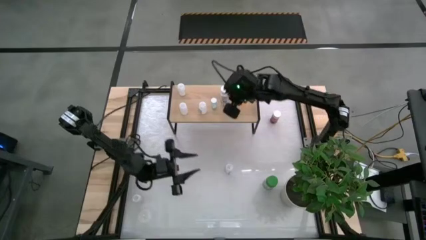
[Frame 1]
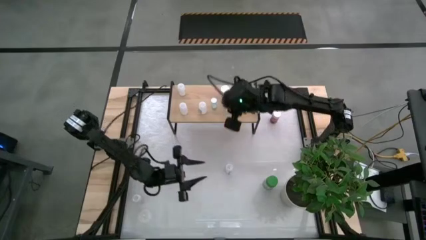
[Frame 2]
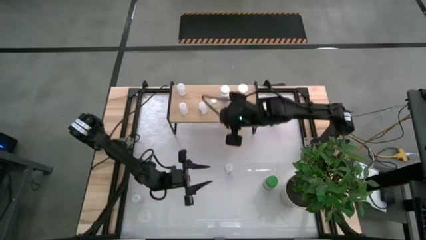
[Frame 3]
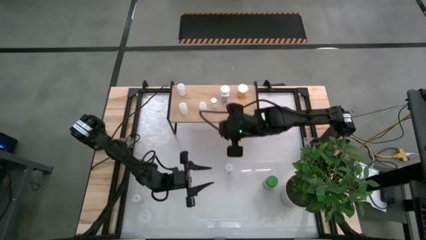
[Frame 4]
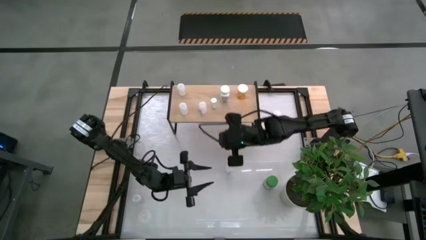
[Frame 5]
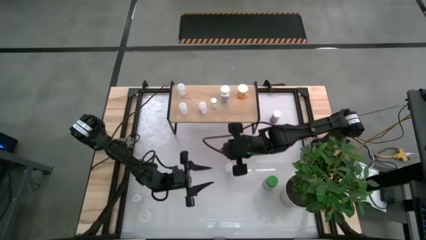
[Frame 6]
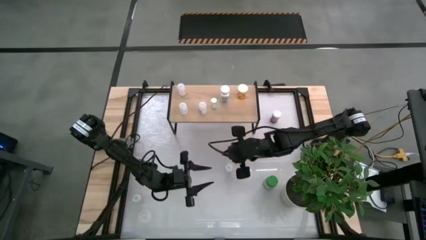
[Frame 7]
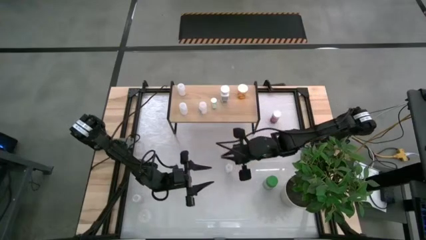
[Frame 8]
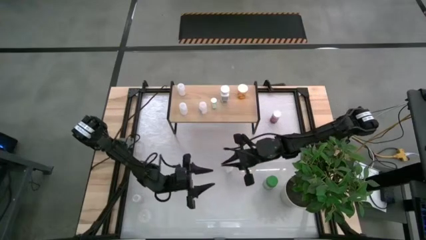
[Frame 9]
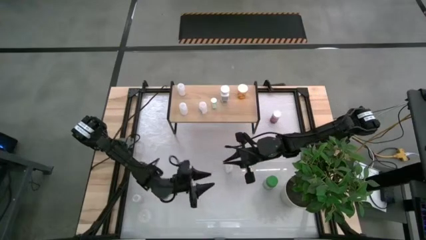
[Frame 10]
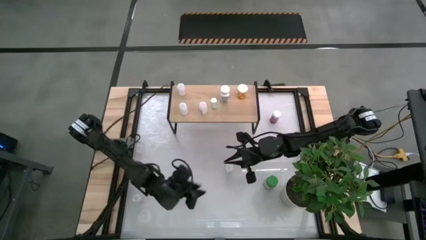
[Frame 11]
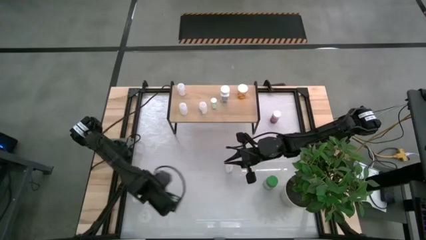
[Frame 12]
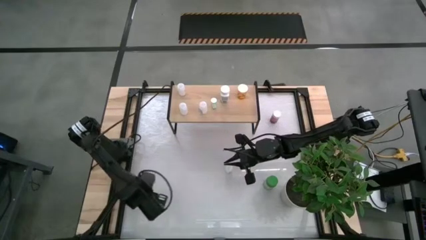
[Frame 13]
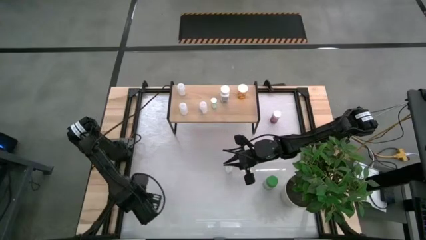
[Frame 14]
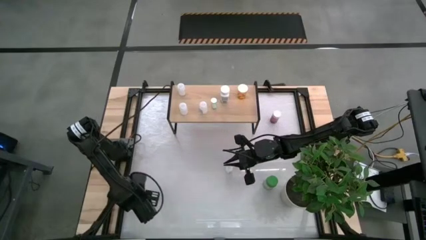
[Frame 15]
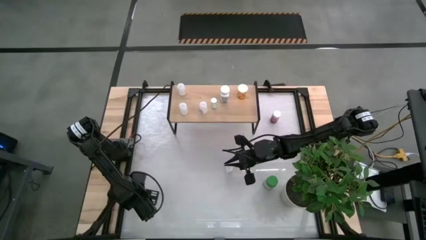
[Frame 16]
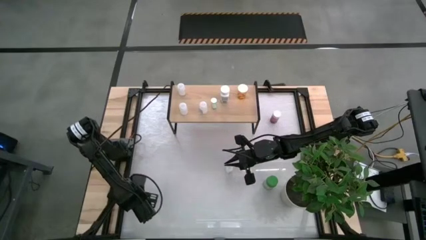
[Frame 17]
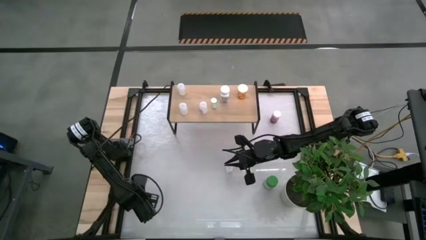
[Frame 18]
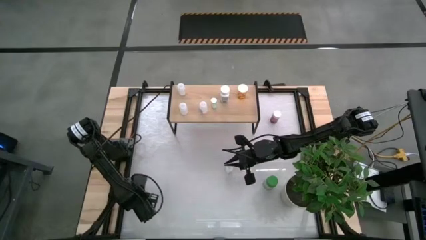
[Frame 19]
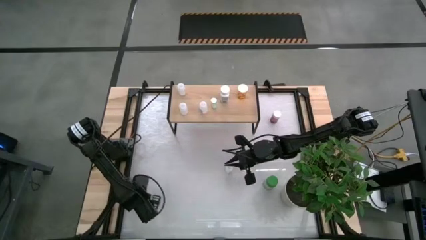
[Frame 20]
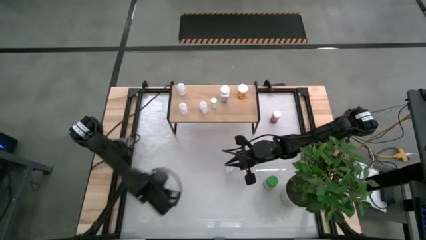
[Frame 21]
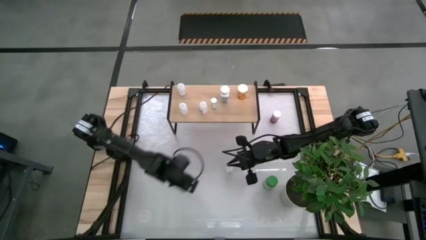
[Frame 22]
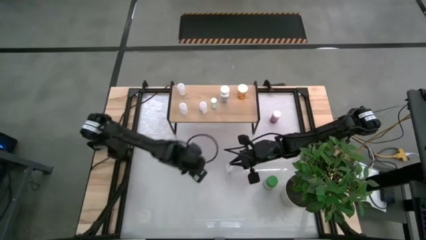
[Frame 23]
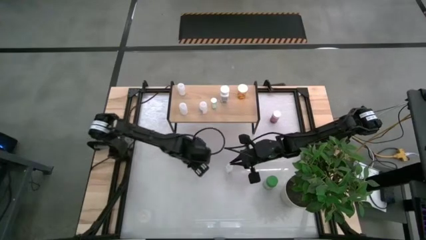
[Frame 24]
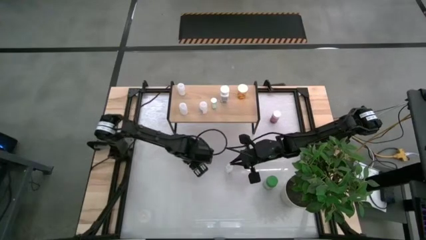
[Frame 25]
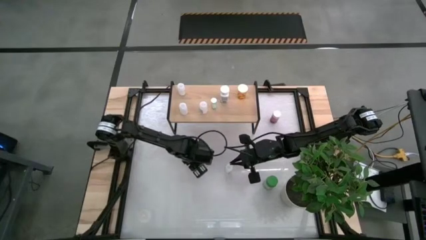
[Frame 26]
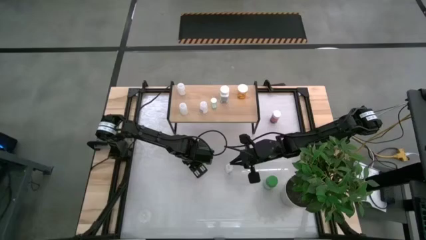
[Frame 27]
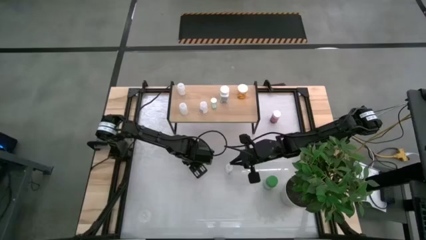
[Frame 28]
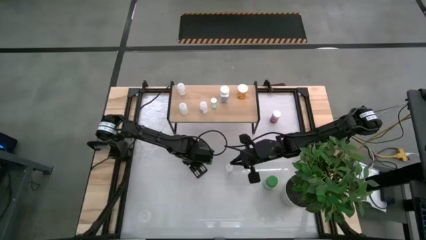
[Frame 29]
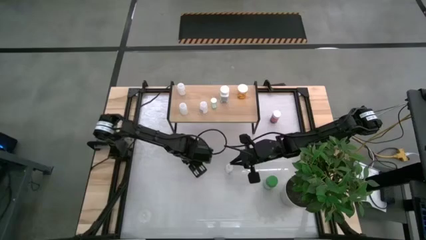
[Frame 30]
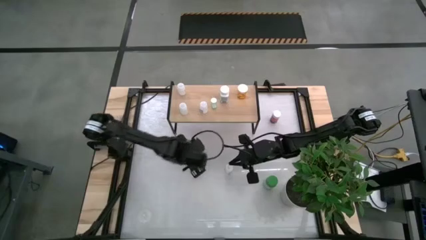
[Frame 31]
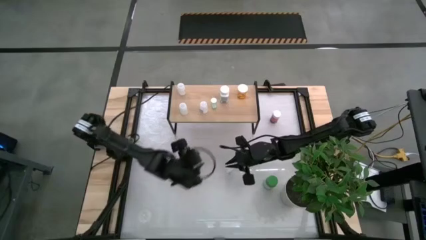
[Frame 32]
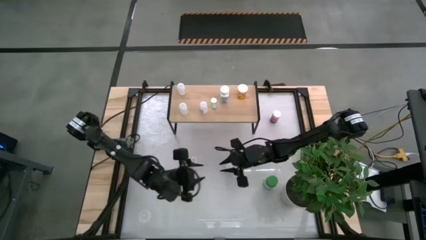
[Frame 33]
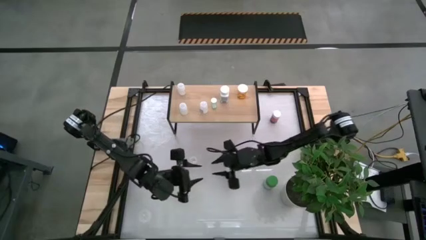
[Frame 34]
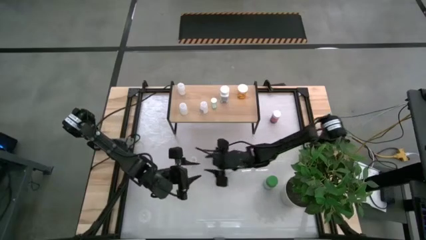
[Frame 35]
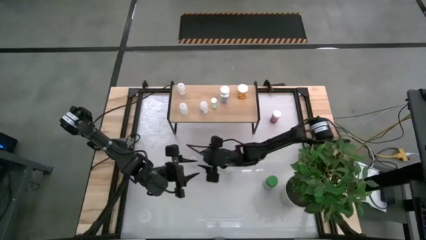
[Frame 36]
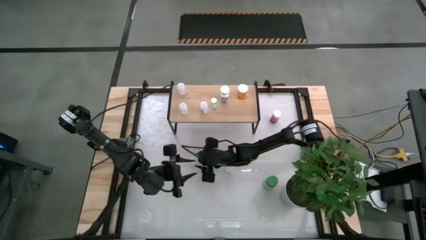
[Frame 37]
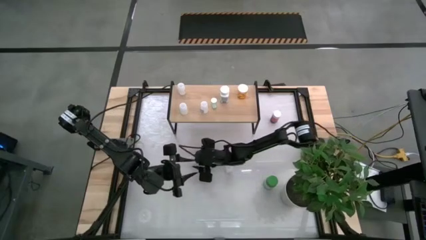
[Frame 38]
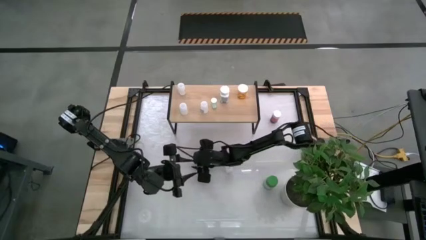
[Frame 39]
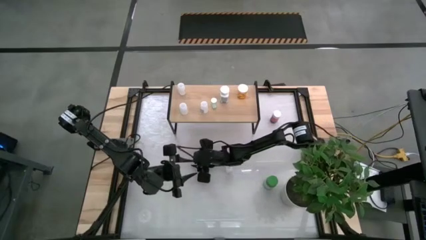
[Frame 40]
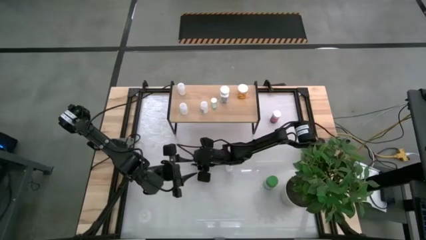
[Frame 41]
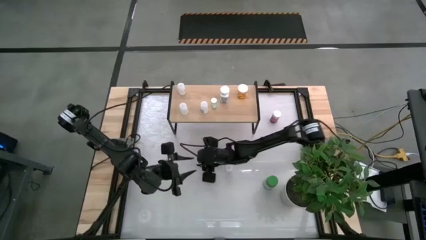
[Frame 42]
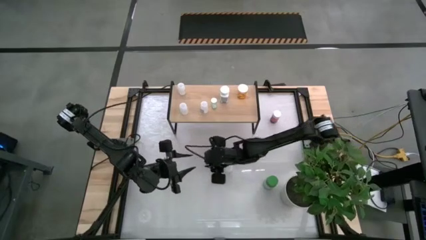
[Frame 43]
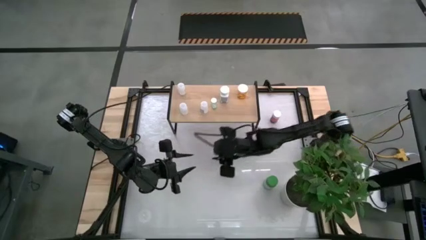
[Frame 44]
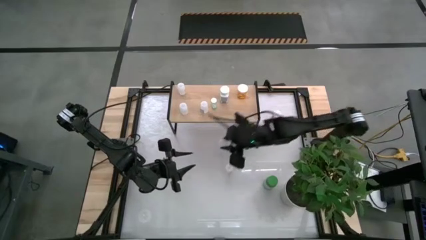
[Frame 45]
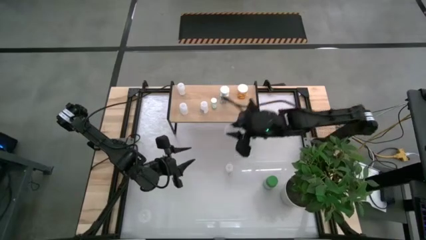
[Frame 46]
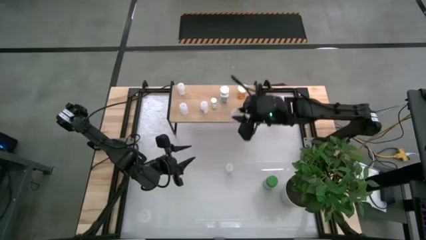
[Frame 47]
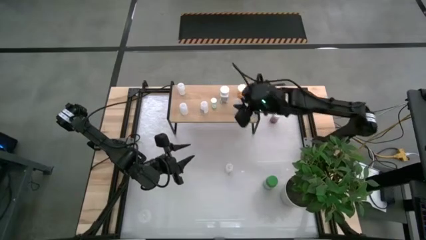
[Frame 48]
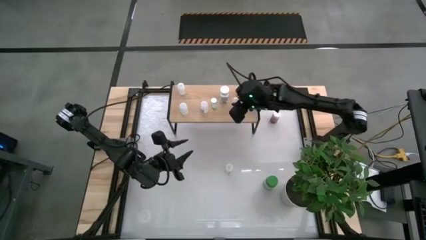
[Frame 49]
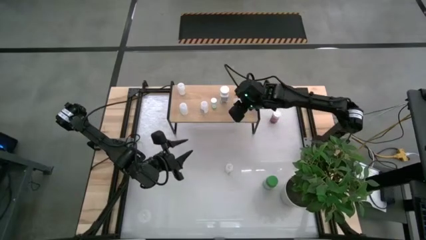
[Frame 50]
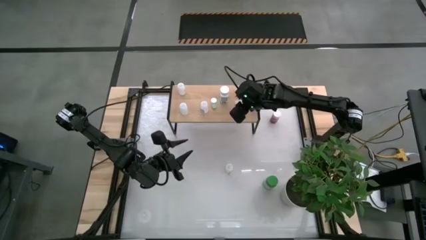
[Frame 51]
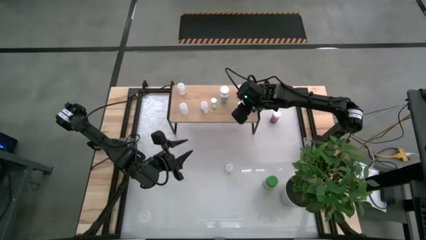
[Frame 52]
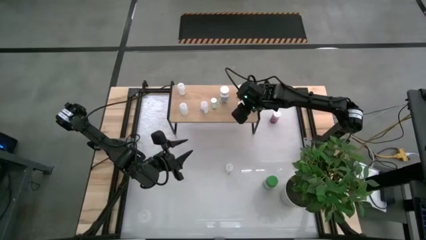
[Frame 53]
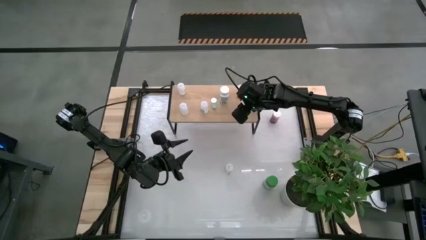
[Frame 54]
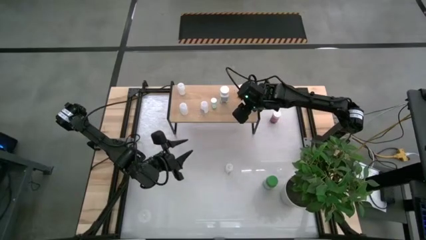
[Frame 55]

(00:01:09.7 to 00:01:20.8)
Task: Pick and place medicine bottles onto shelf by color
Put the transparent pill bottle on the shelf
